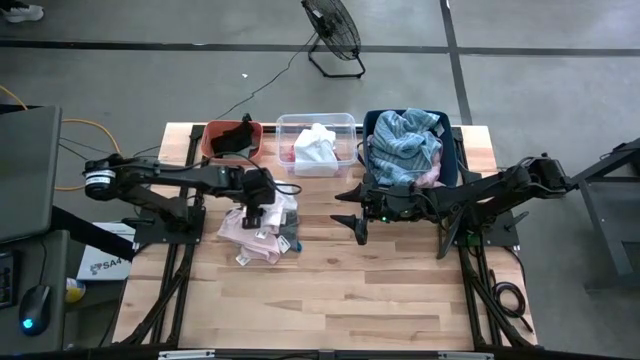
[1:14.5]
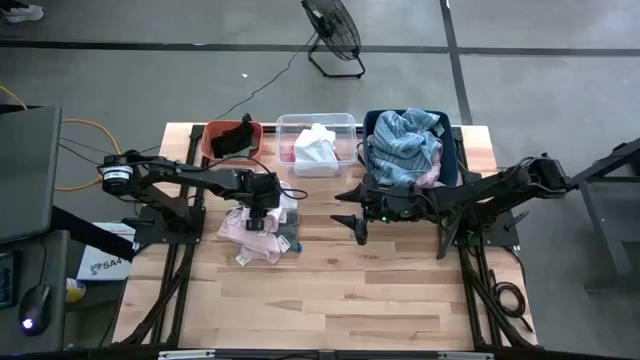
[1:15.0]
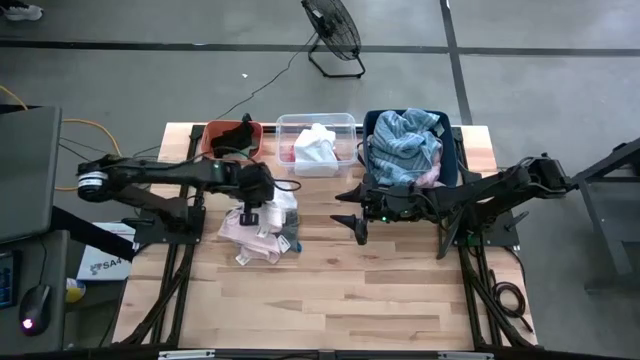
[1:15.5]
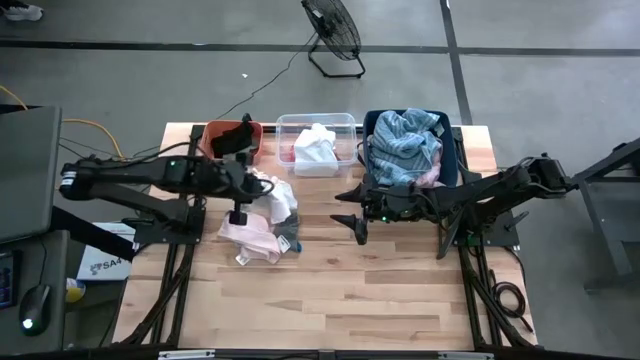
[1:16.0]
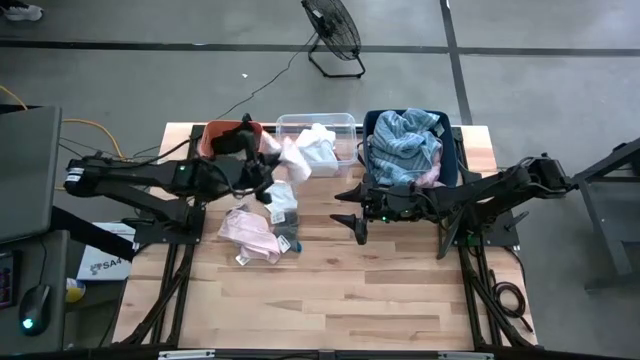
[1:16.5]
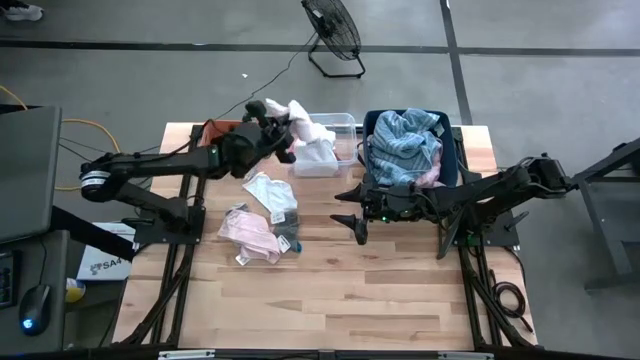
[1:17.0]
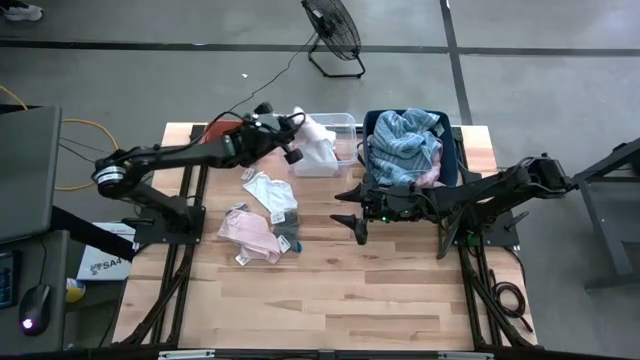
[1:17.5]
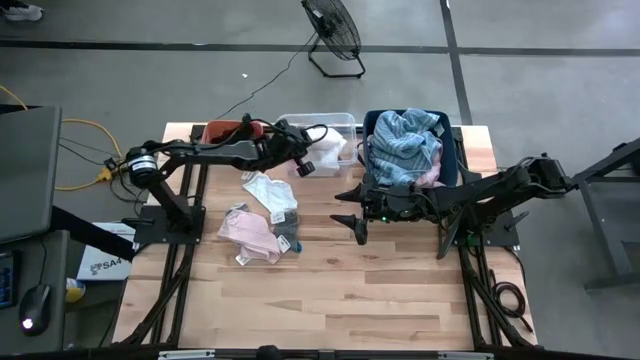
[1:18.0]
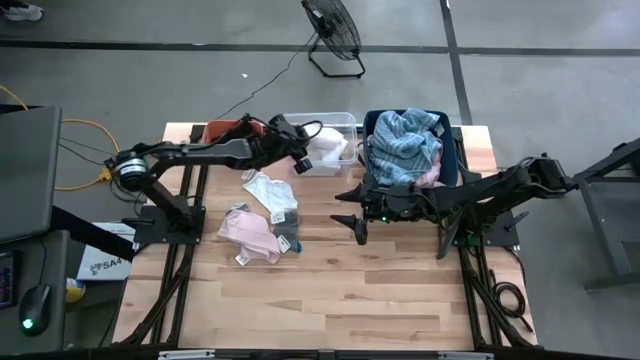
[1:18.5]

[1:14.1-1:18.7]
Task: Pick & Place Cloths
Put the white underwear into the transparent bin

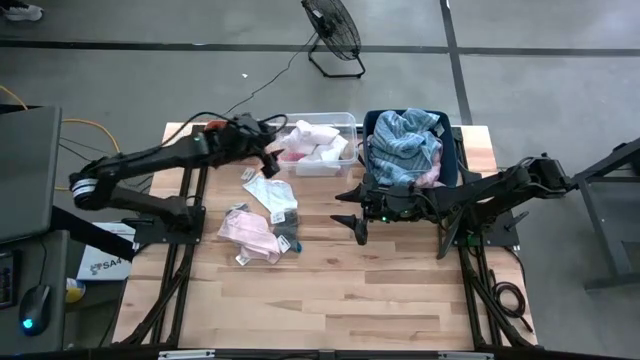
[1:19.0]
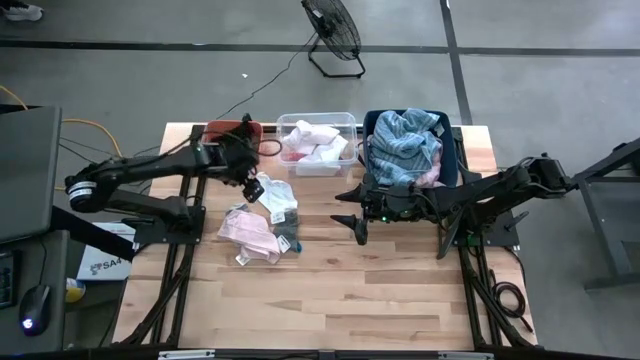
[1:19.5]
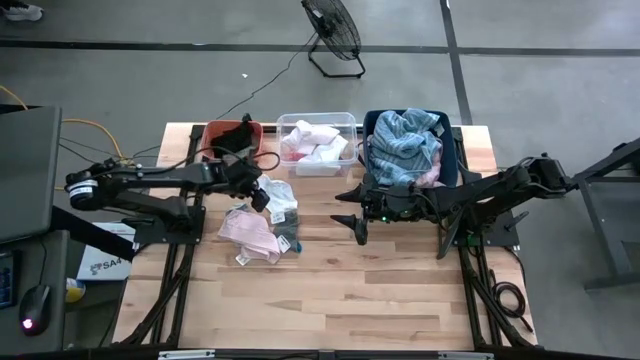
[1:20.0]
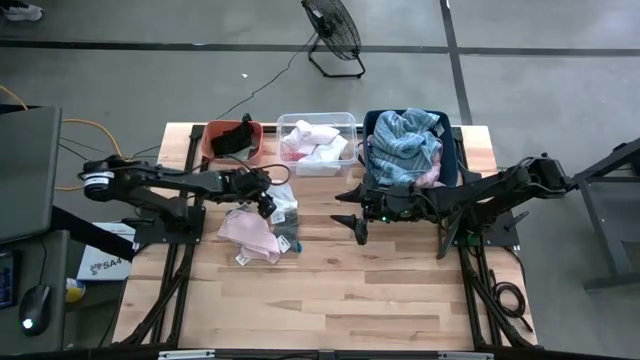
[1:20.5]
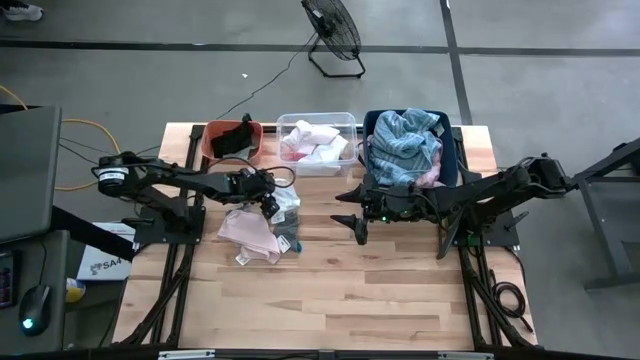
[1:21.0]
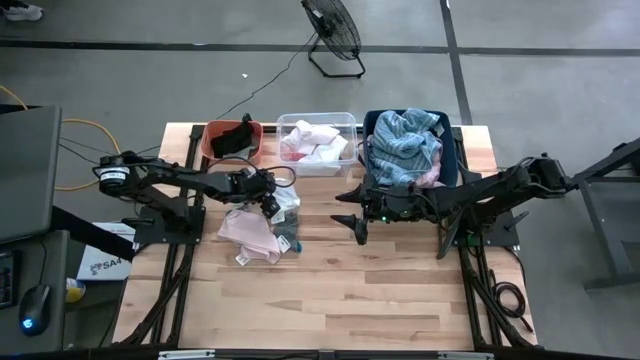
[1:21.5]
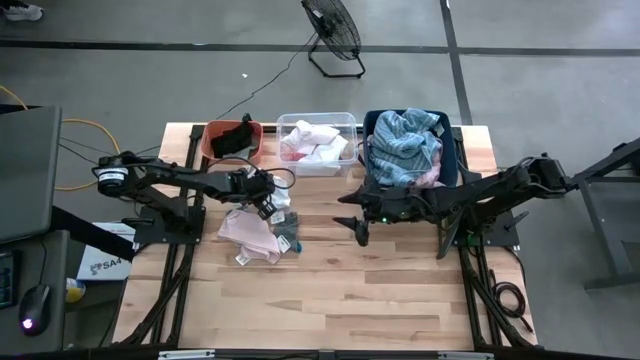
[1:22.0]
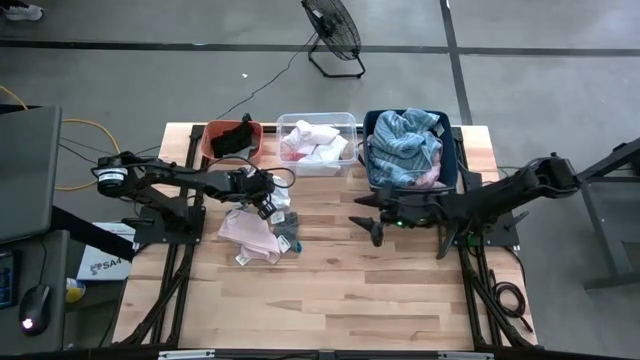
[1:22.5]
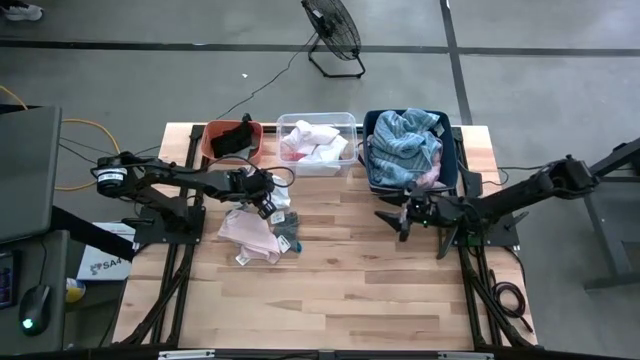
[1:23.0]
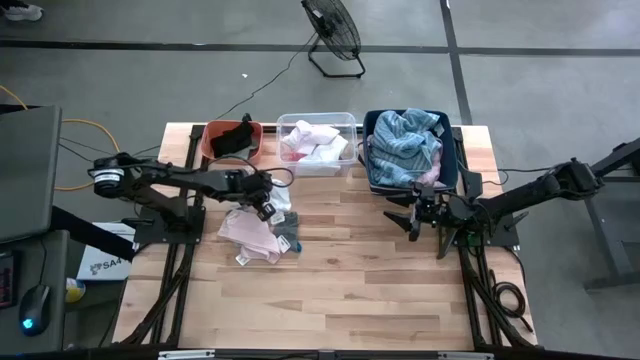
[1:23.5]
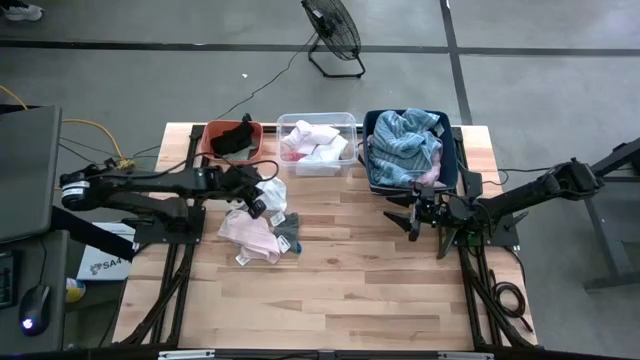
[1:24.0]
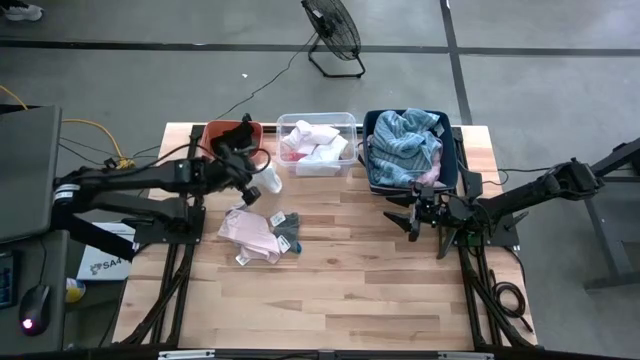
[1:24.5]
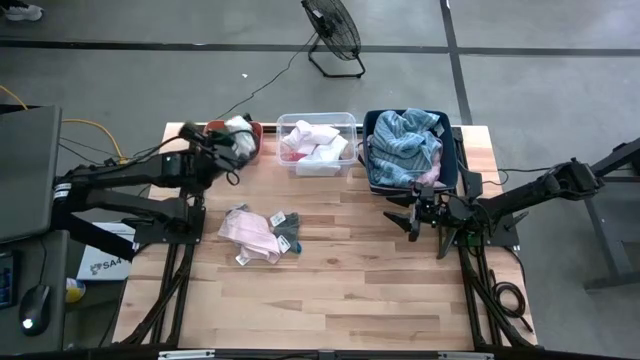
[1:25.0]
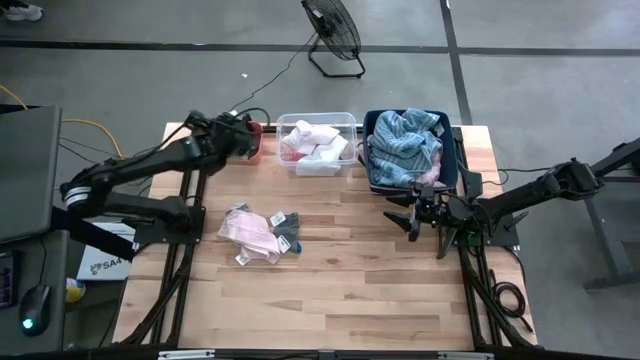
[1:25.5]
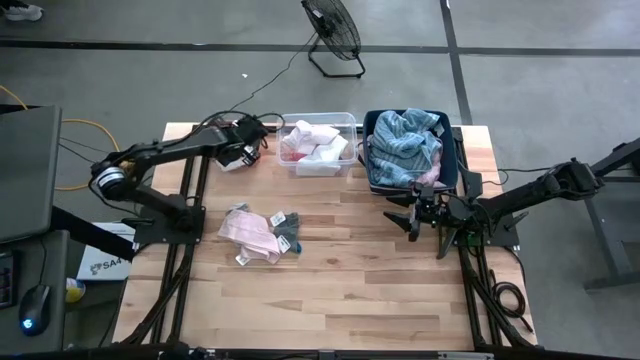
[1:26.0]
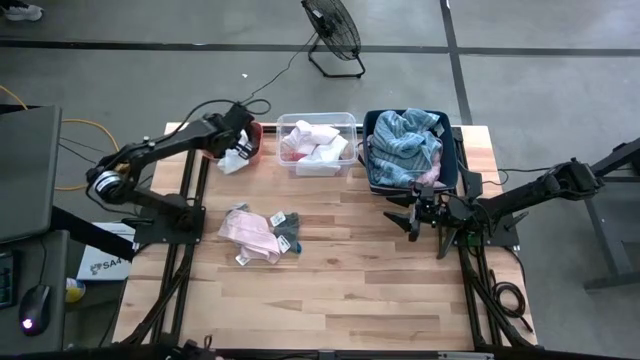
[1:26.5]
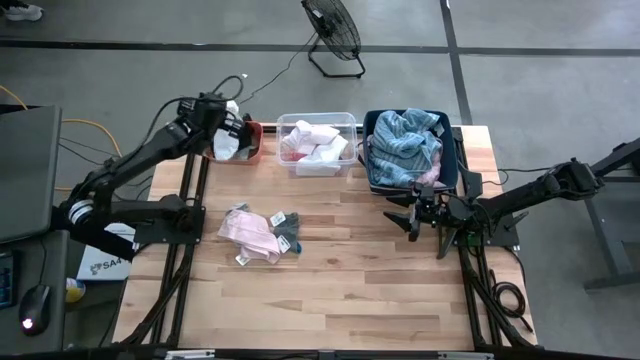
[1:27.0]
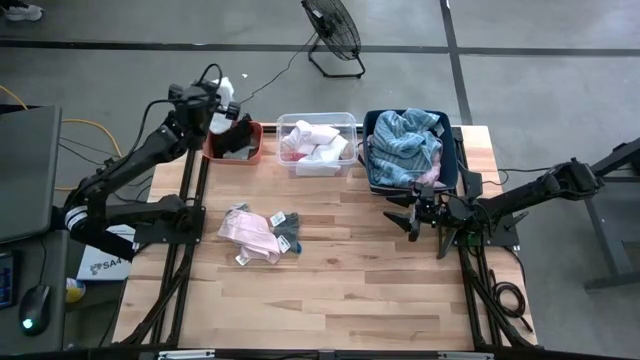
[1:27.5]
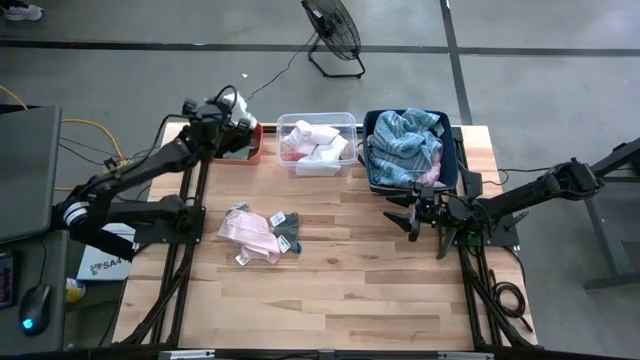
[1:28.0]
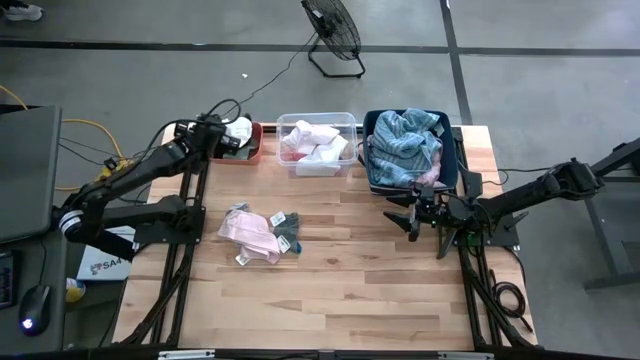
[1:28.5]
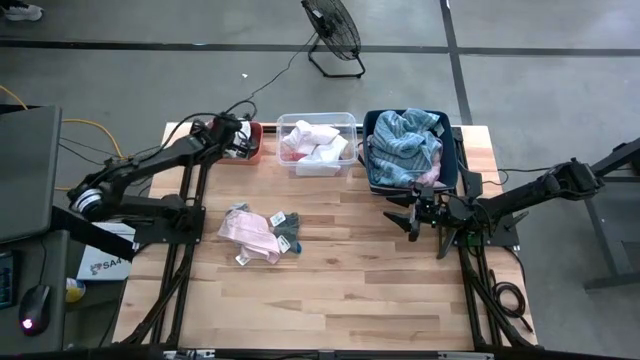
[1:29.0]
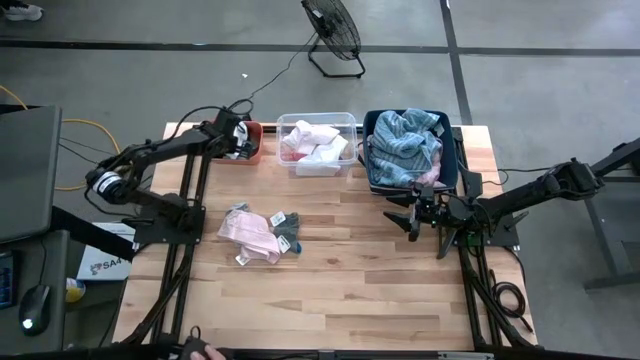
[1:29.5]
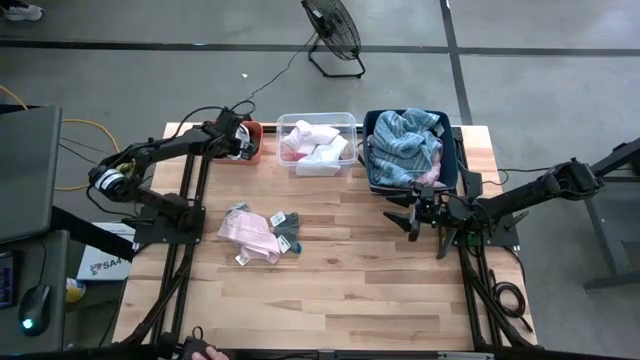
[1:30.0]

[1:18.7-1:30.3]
Put the white sock into the orange bin

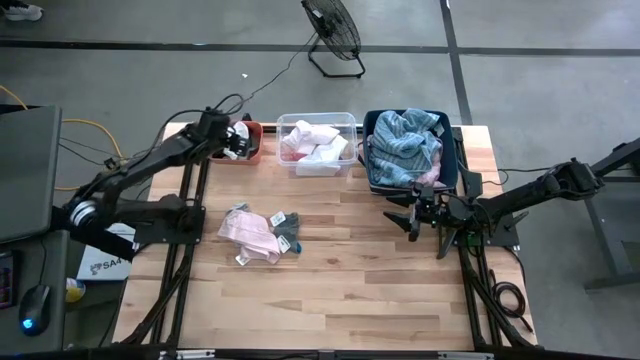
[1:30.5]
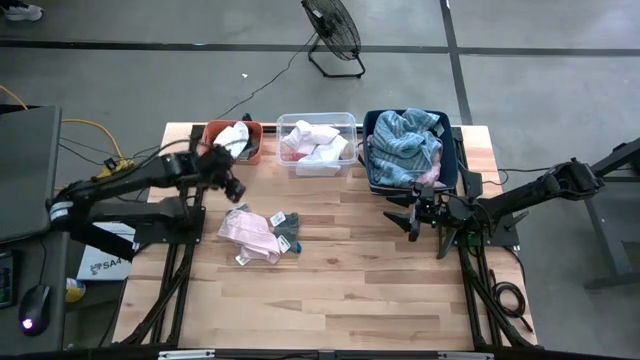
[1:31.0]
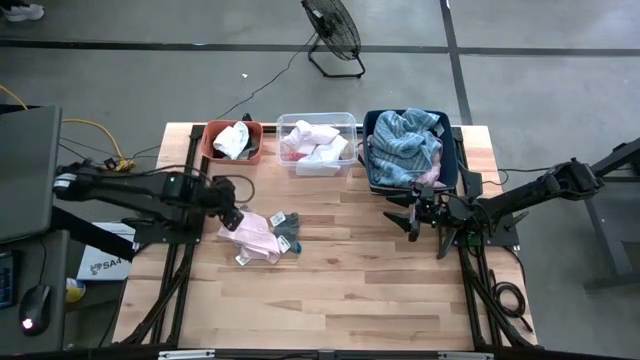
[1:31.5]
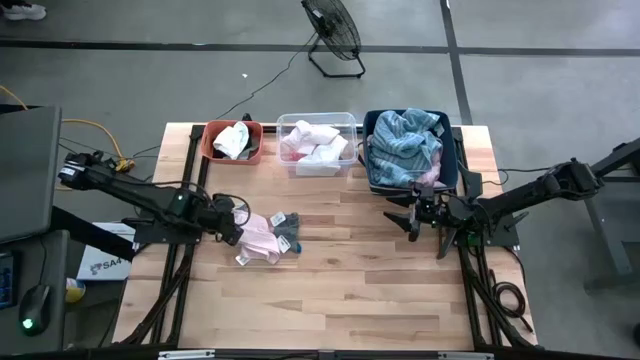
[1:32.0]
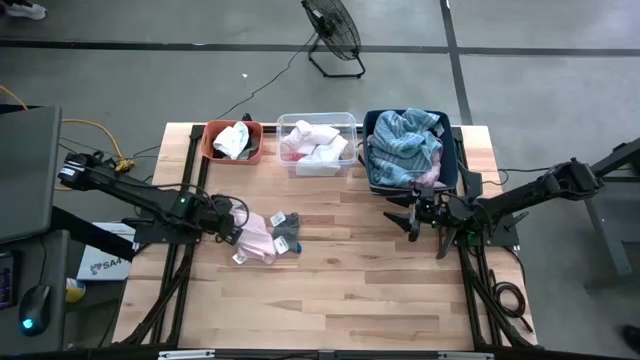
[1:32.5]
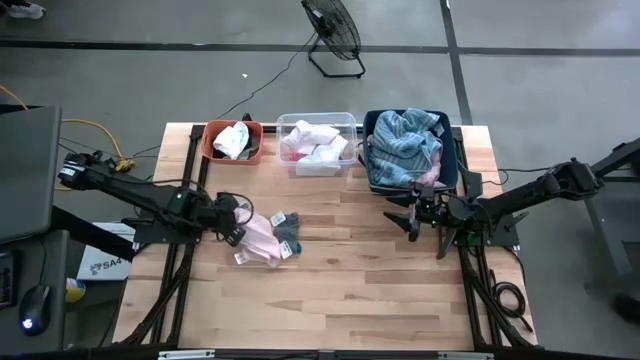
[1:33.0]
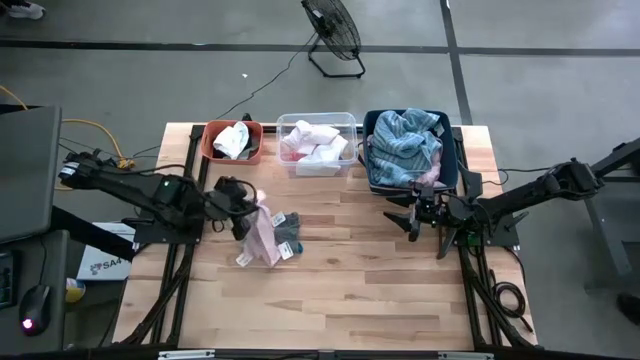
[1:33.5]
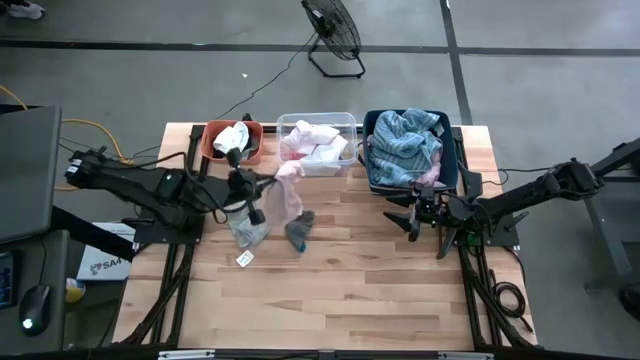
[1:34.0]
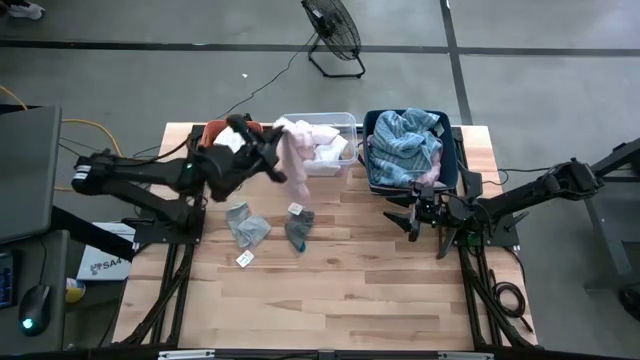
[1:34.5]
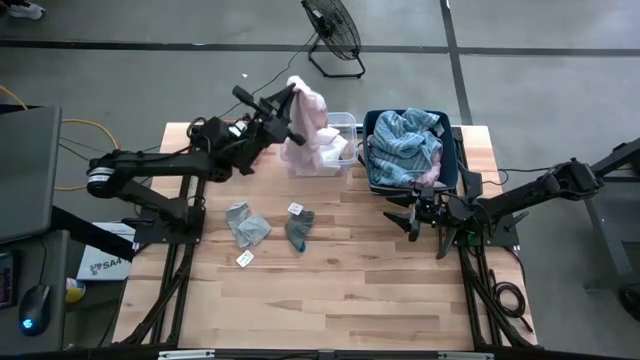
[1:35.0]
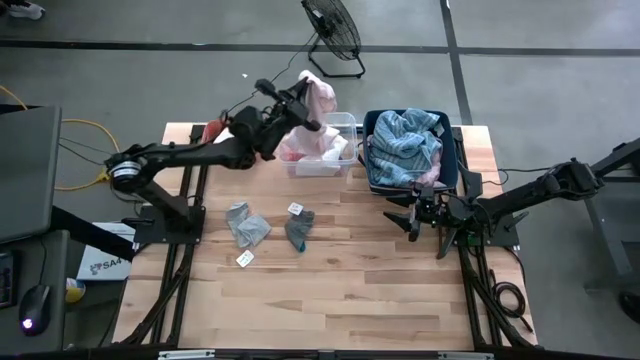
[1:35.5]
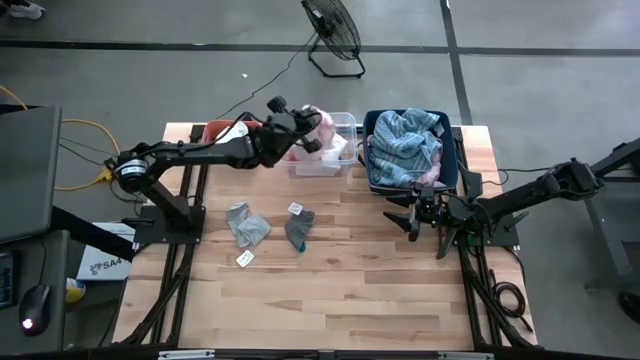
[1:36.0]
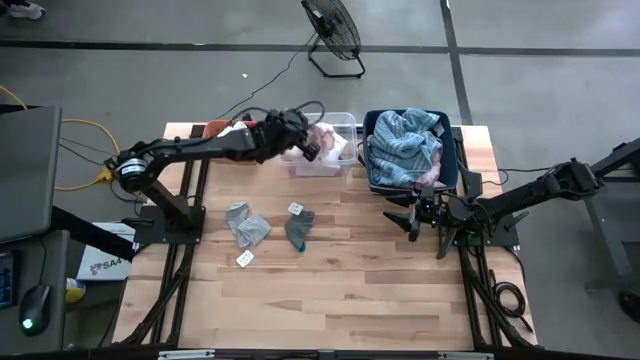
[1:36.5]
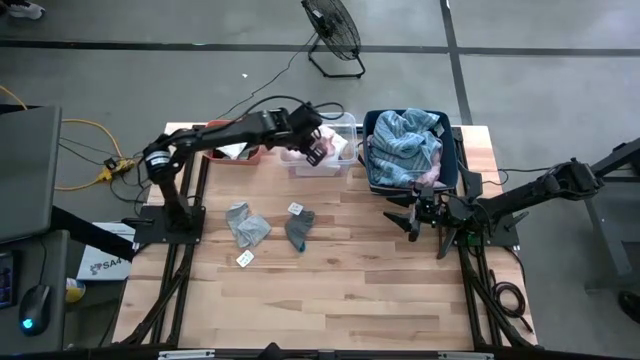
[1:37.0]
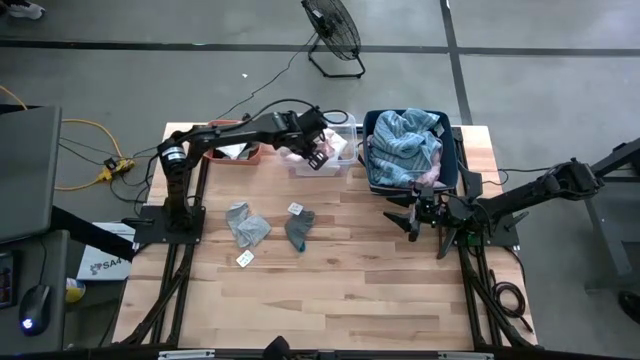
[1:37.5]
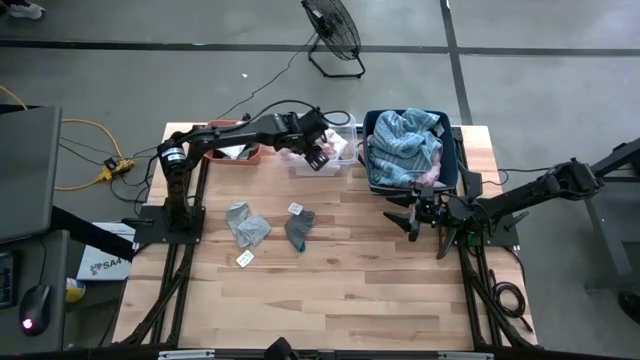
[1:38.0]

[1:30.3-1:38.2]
Put the white underwear into the transparent bin
